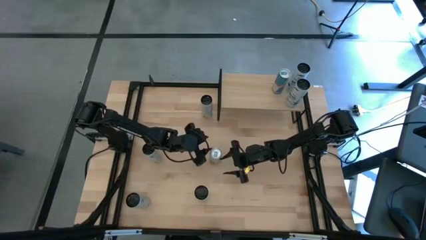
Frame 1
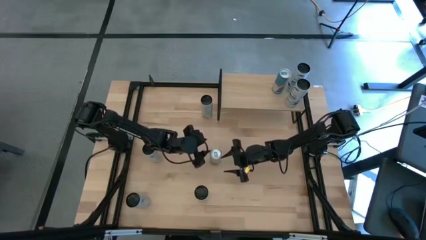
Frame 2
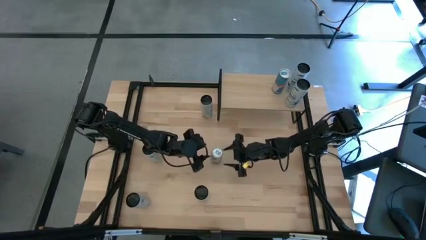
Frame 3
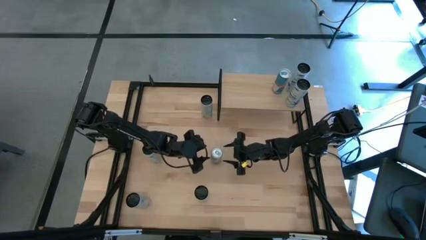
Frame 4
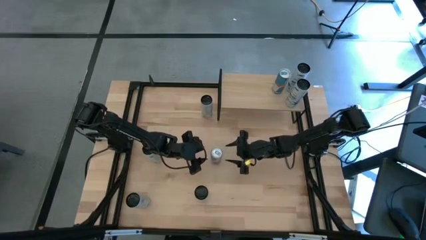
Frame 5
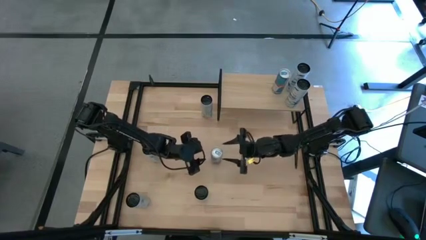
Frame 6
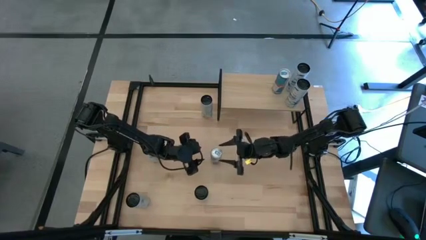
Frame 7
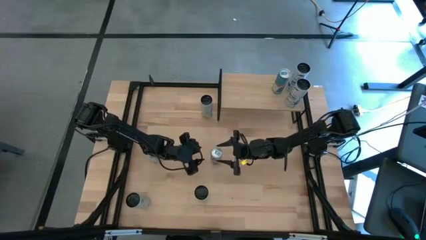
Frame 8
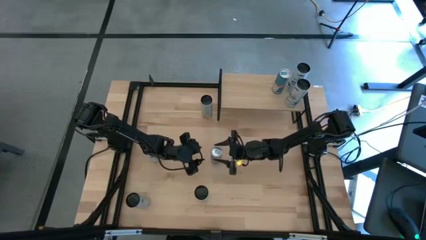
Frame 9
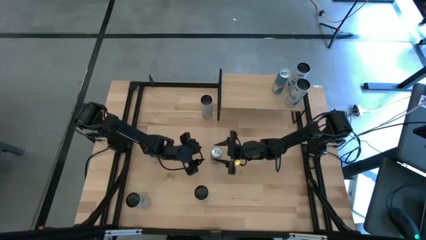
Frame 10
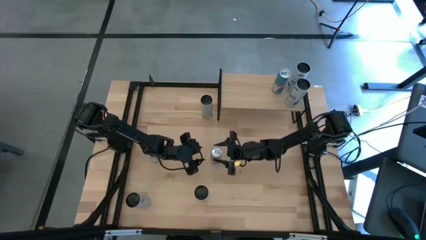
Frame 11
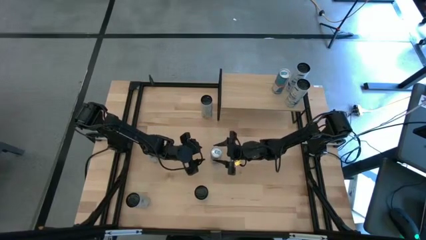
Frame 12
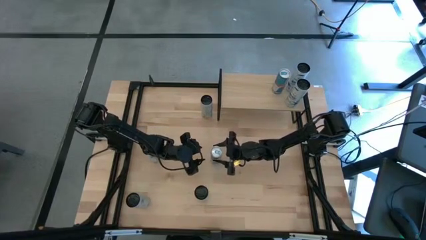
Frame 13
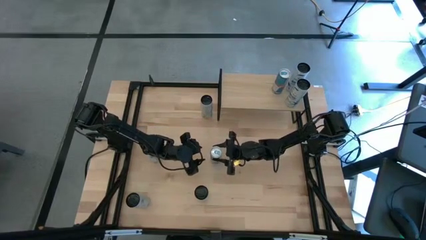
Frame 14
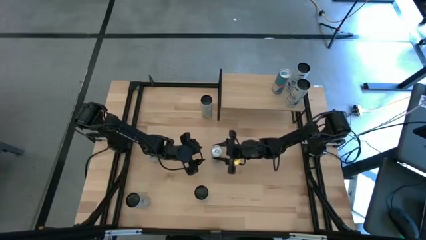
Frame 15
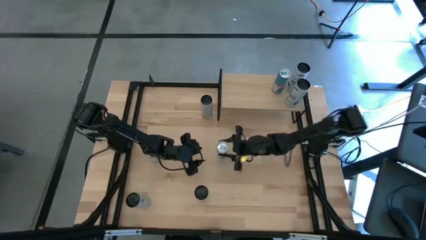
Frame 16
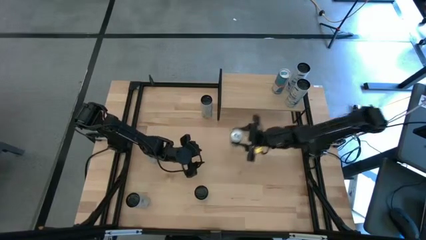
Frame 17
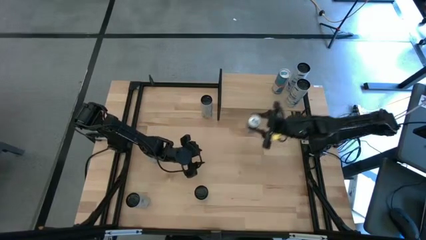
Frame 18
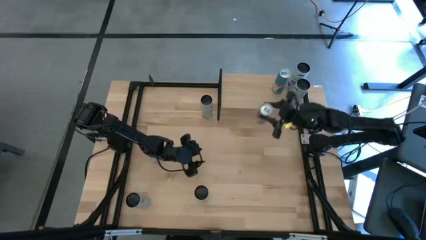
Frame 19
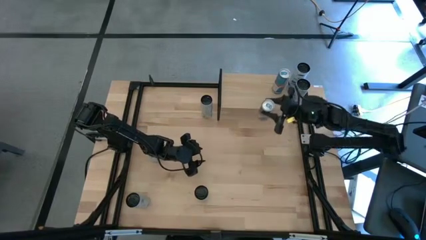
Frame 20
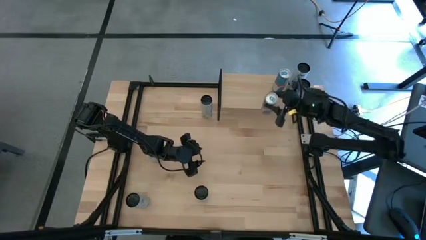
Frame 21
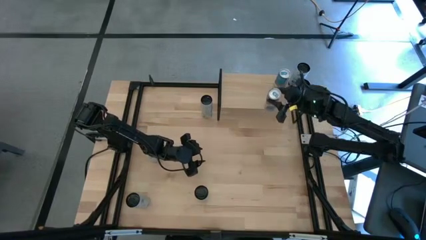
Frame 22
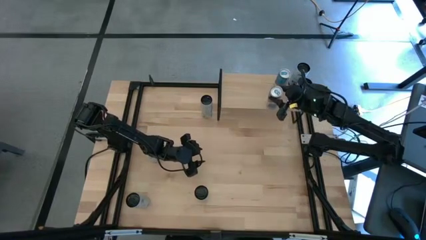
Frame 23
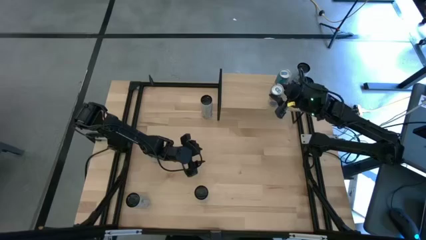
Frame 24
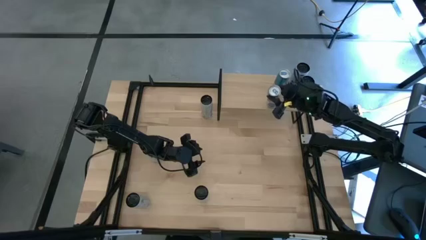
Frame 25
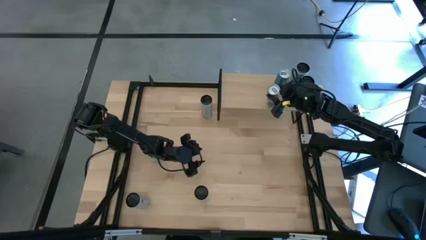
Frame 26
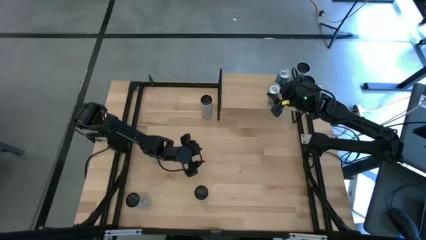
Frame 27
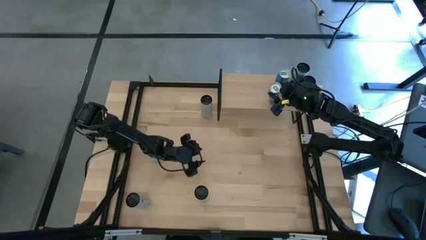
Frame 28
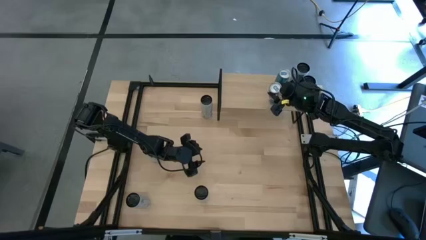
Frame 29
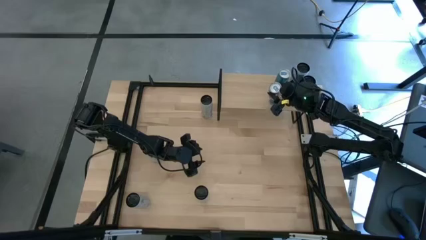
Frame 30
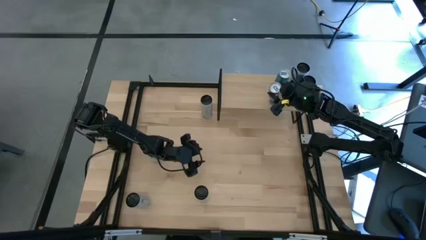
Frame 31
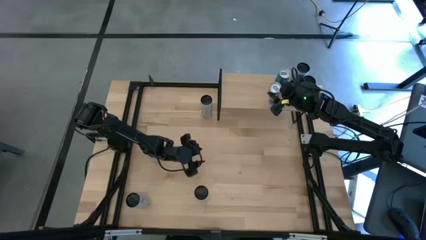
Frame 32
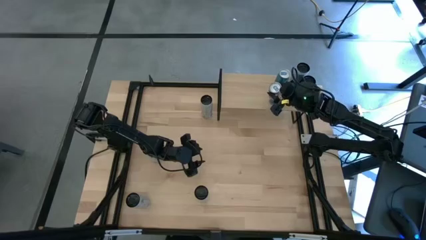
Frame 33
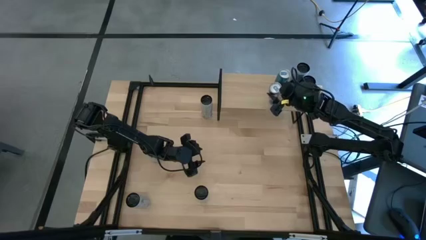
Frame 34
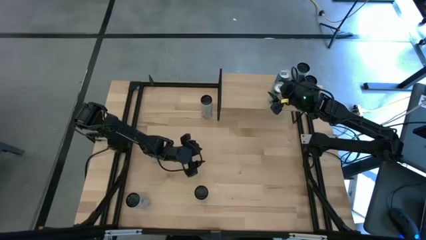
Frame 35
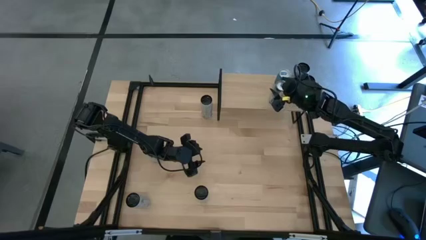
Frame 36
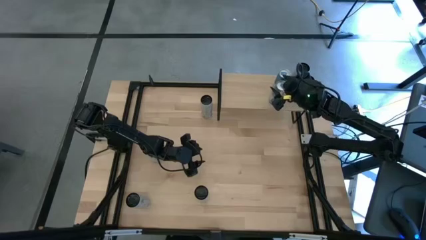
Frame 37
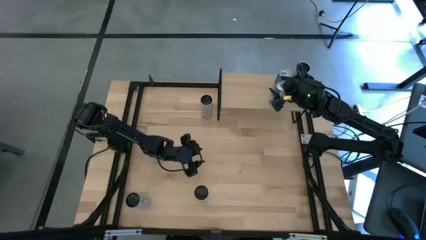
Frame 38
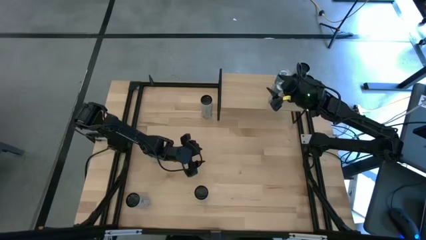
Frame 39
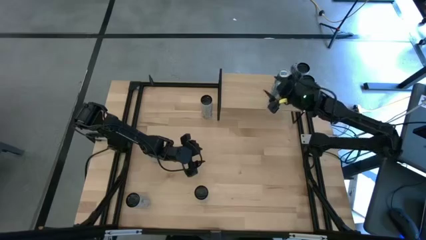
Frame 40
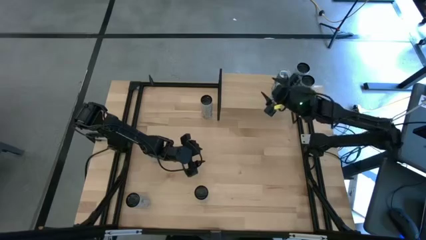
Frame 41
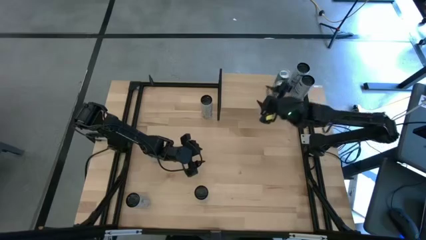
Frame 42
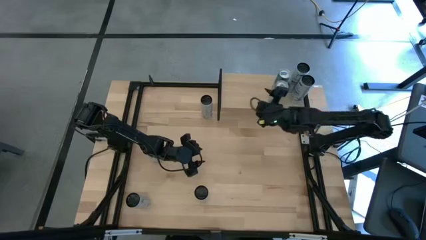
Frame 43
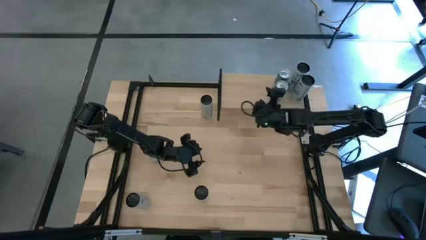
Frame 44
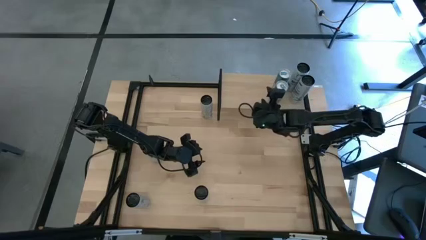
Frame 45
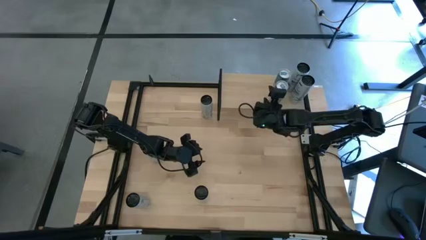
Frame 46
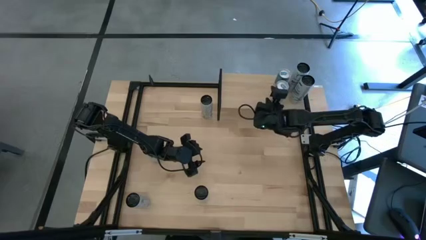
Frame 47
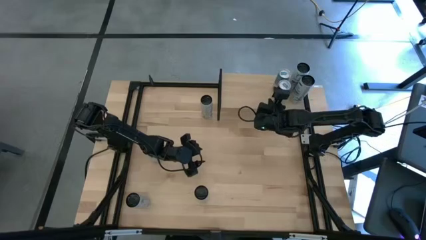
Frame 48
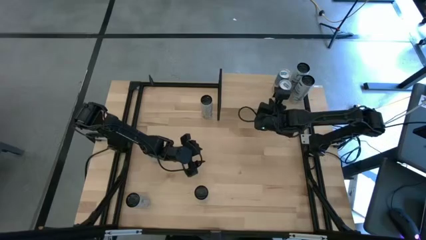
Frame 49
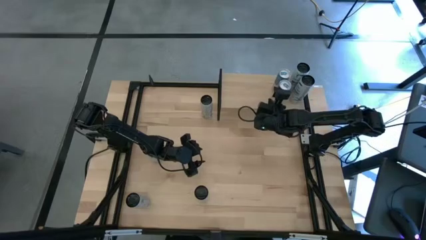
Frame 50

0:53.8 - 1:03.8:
Task: Place canned beverage on shelf
Put the blue soda can on the shelf aligned with the other blue soda can
